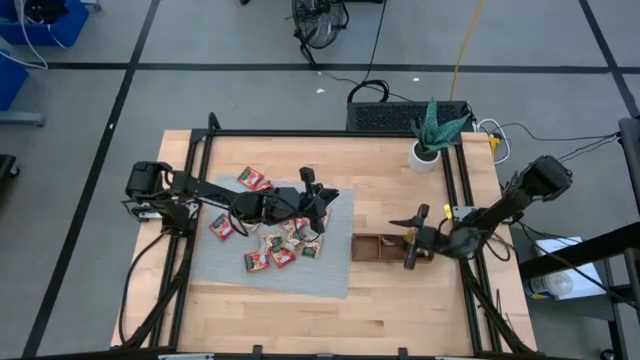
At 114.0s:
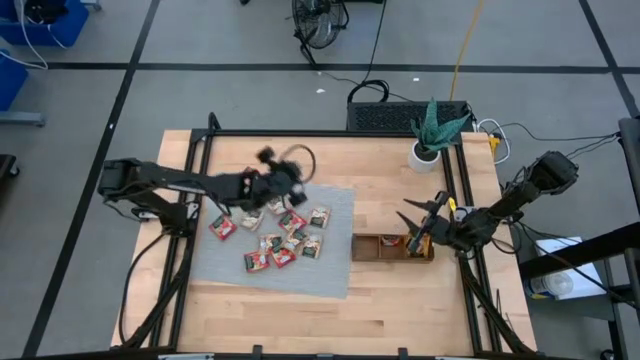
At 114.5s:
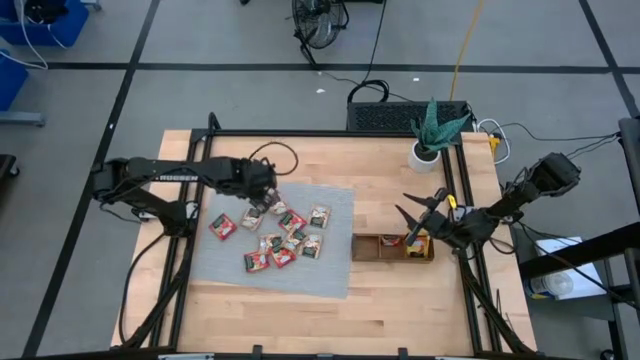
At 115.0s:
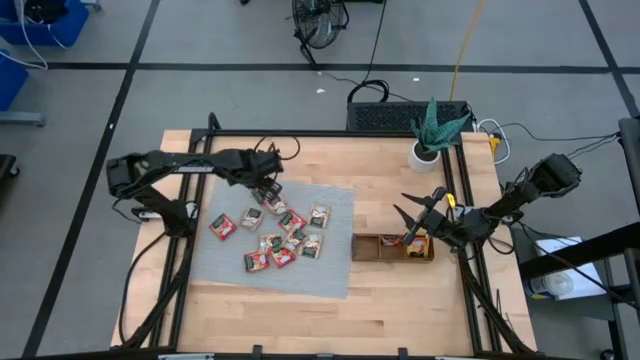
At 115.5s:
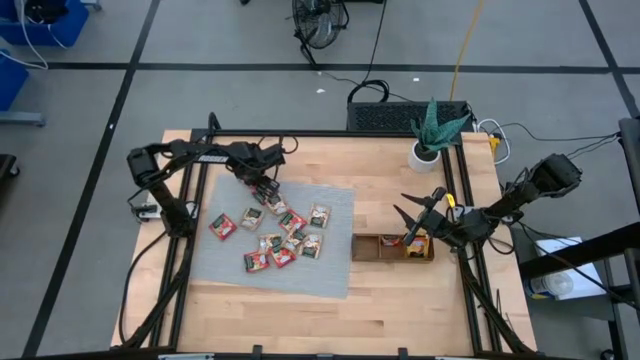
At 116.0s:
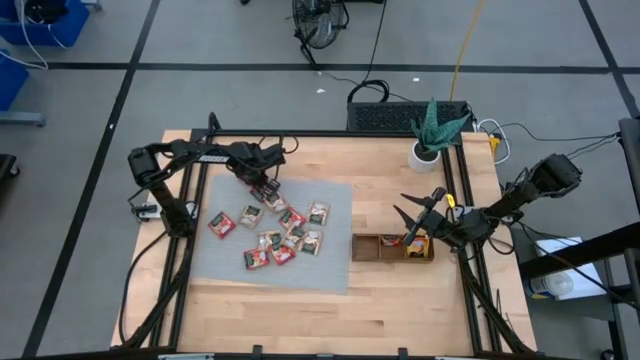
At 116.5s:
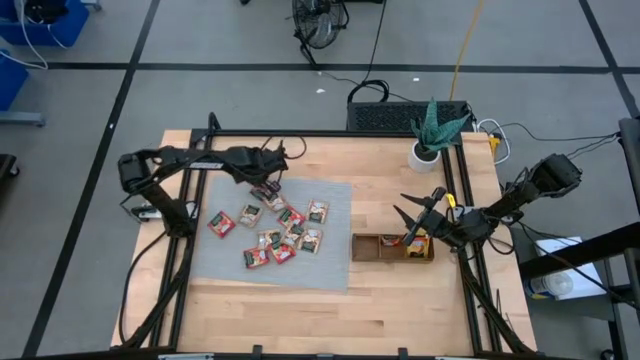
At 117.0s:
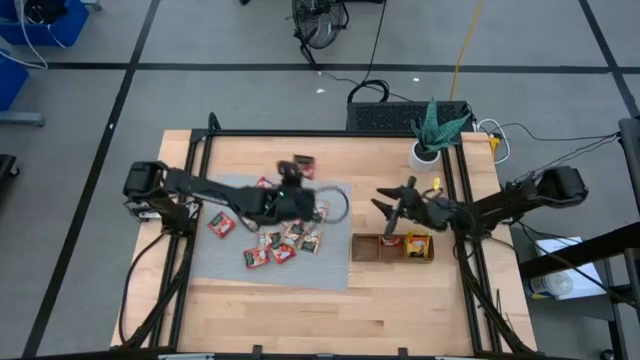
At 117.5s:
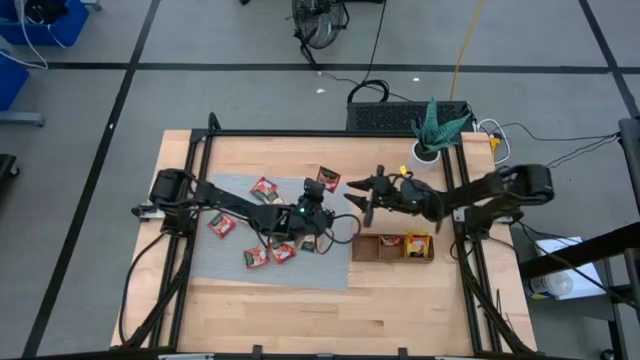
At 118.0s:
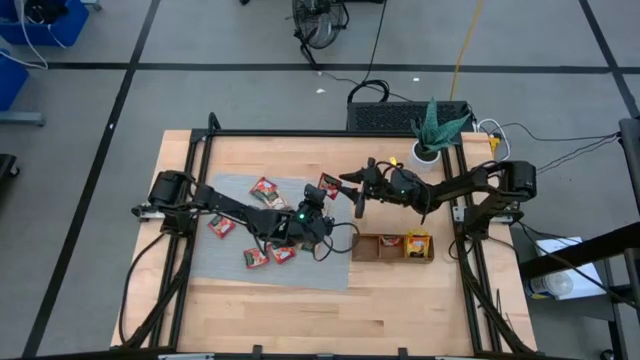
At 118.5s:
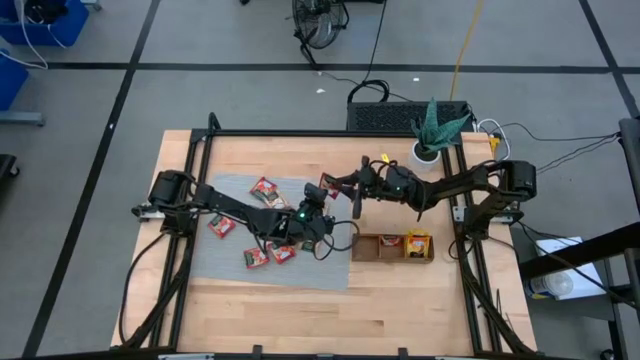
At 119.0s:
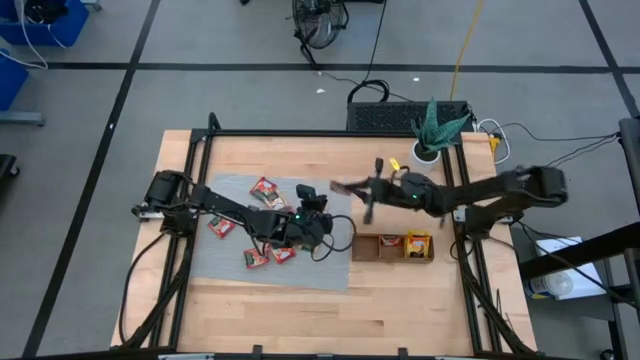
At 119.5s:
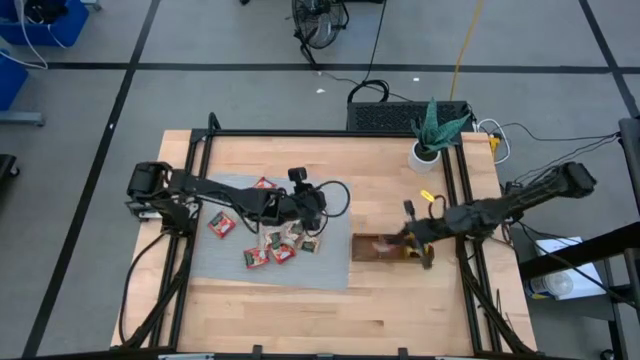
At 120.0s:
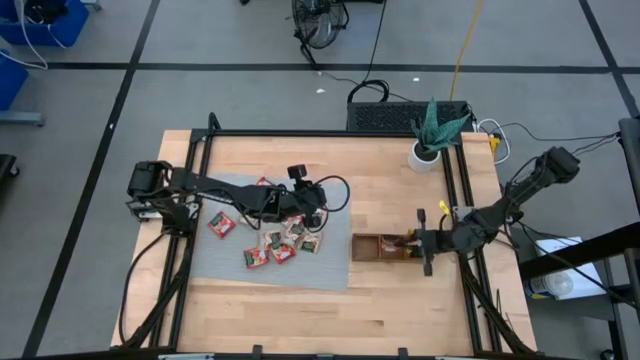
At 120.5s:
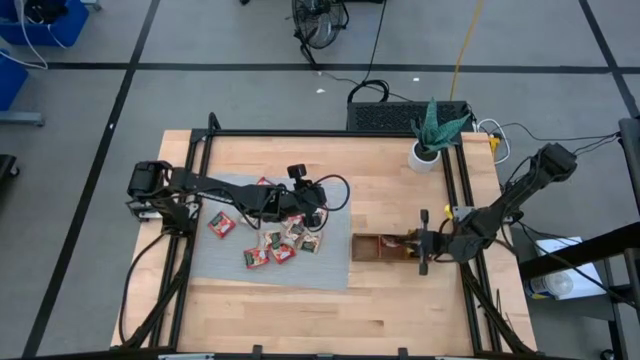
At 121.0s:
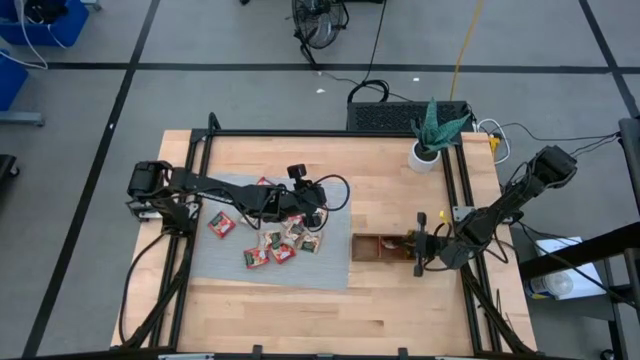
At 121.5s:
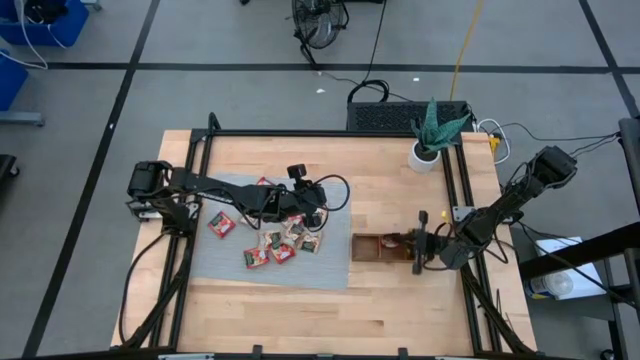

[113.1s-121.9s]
Task: Pick & Place Tea
Put the red tea bag into the middle section of the wooden organizer

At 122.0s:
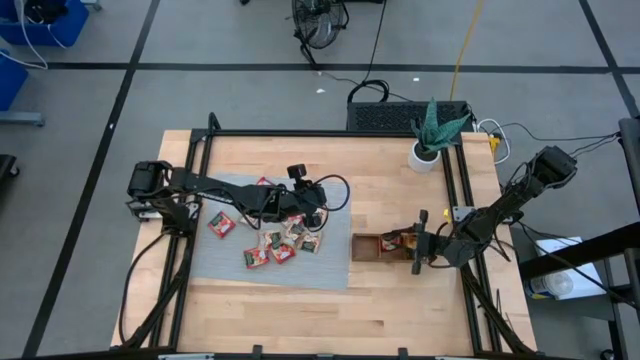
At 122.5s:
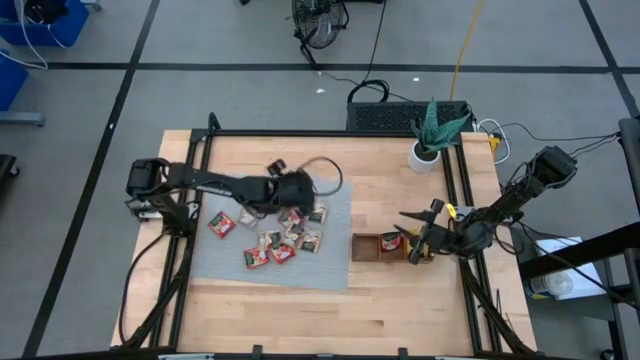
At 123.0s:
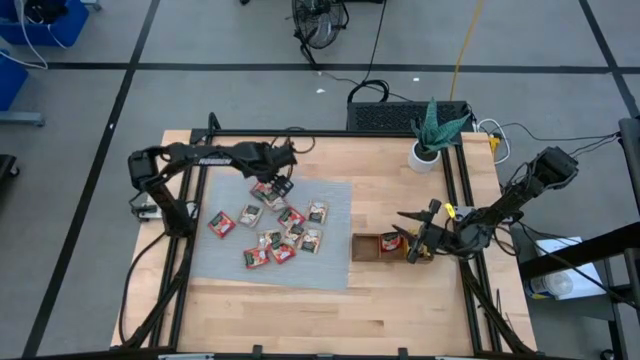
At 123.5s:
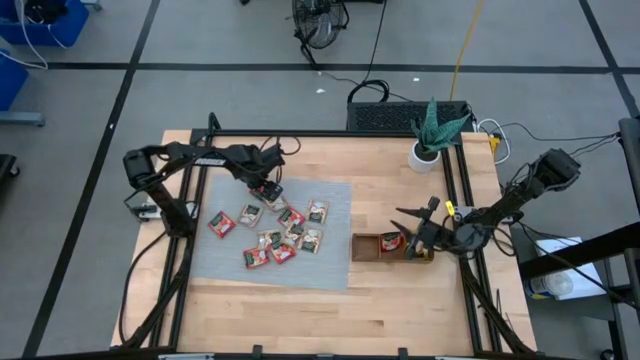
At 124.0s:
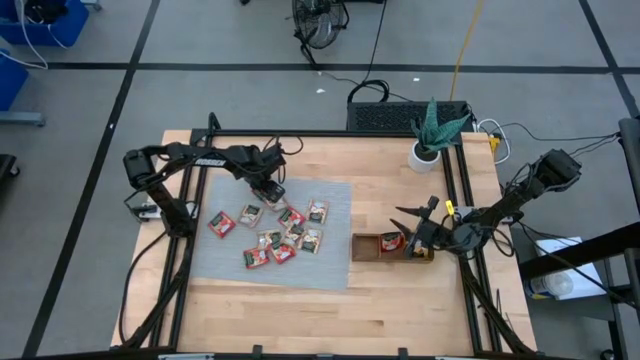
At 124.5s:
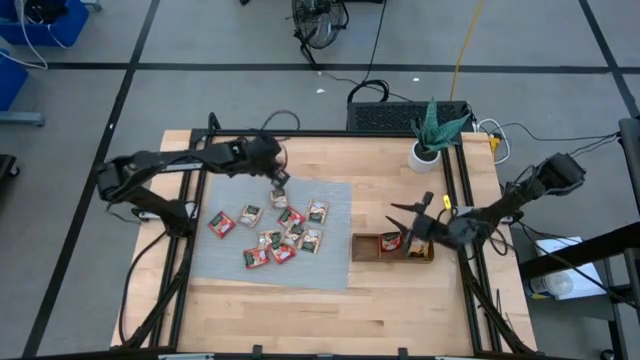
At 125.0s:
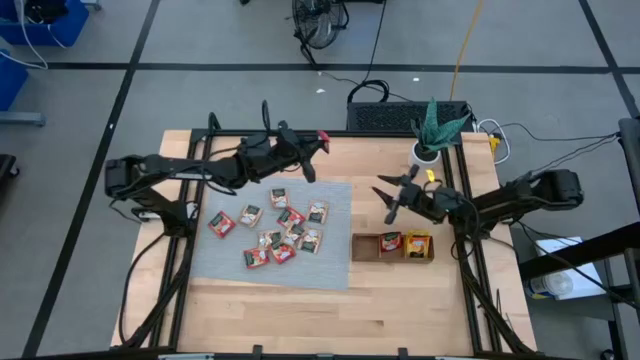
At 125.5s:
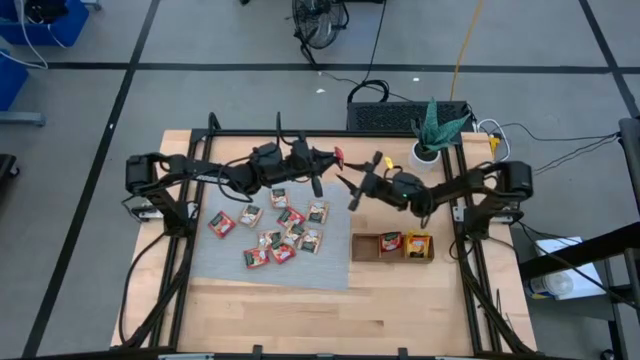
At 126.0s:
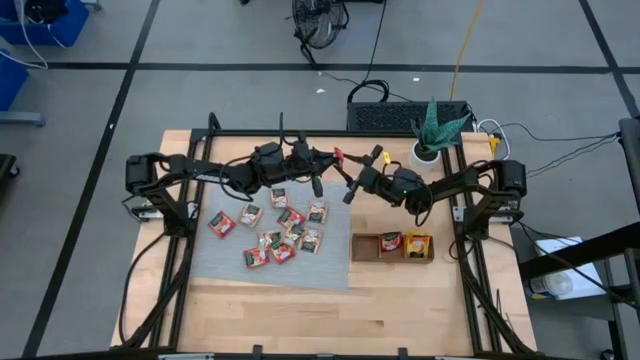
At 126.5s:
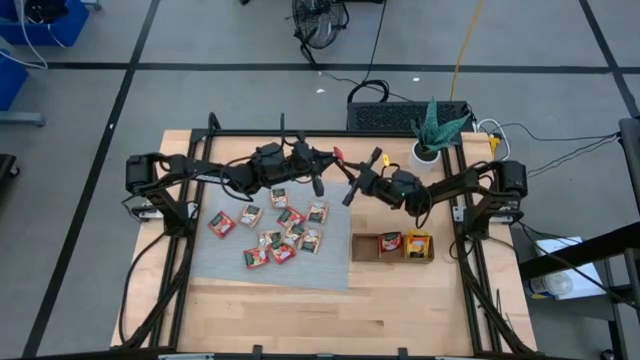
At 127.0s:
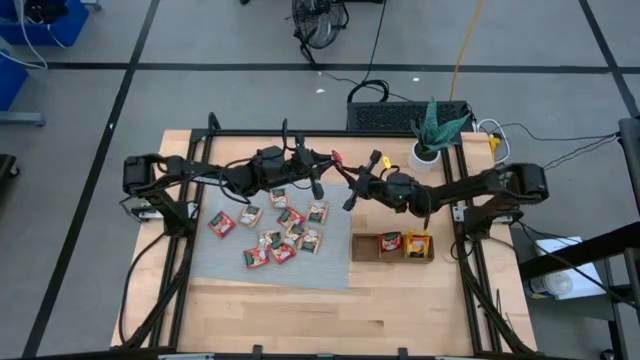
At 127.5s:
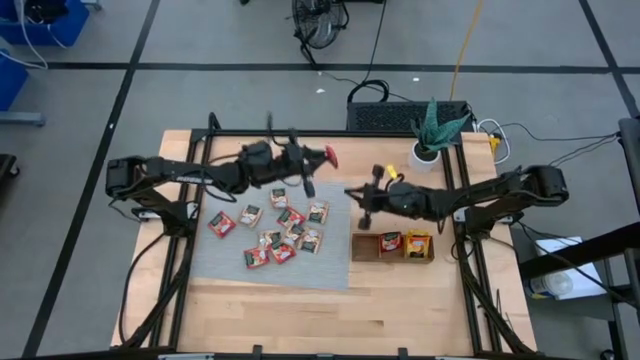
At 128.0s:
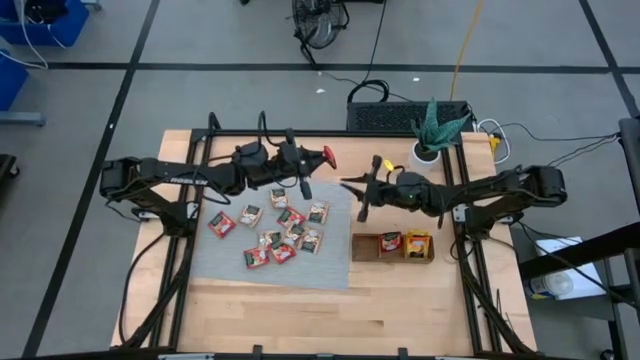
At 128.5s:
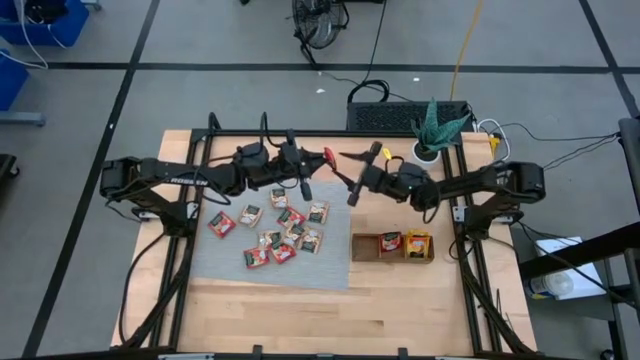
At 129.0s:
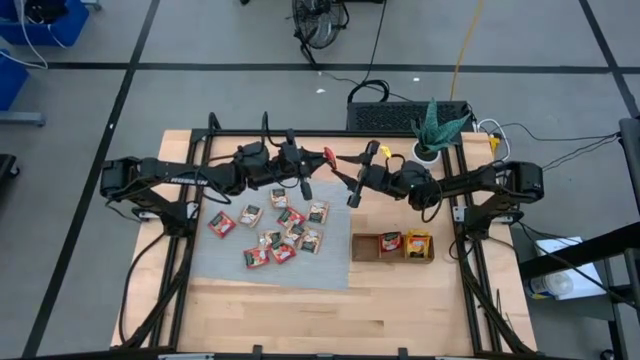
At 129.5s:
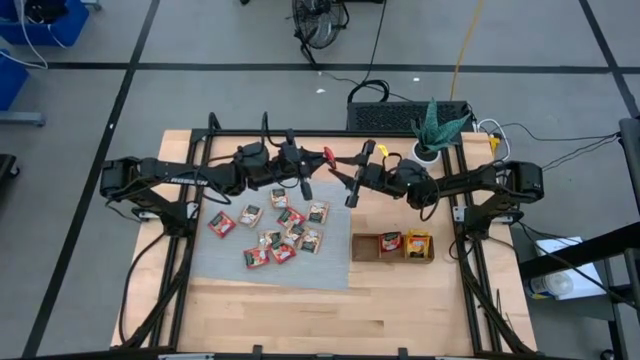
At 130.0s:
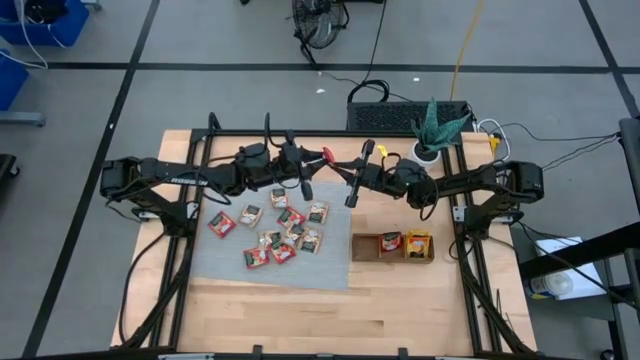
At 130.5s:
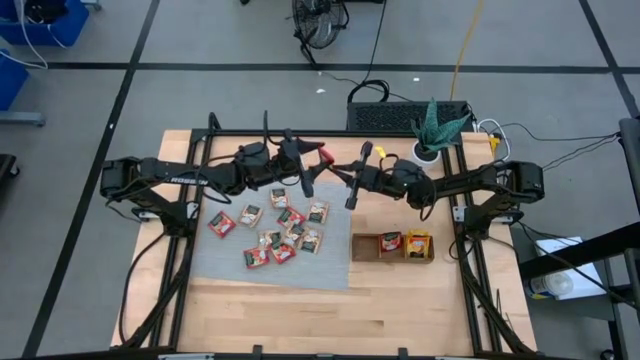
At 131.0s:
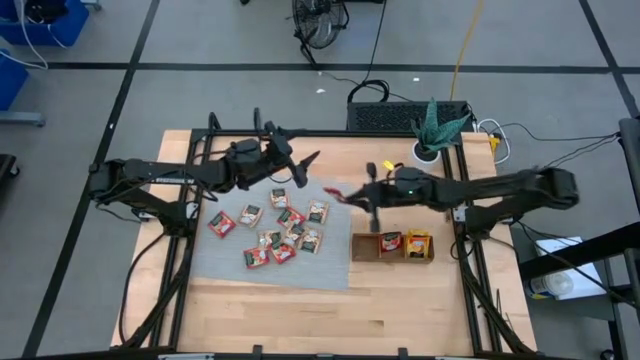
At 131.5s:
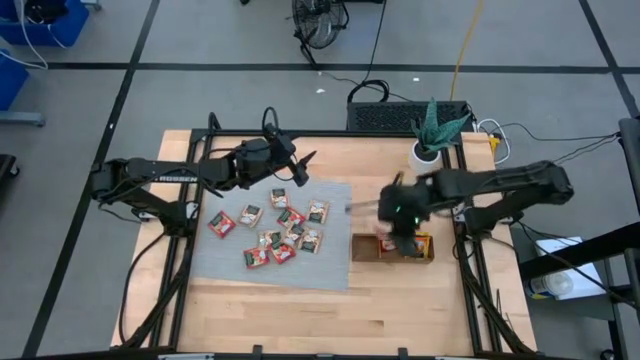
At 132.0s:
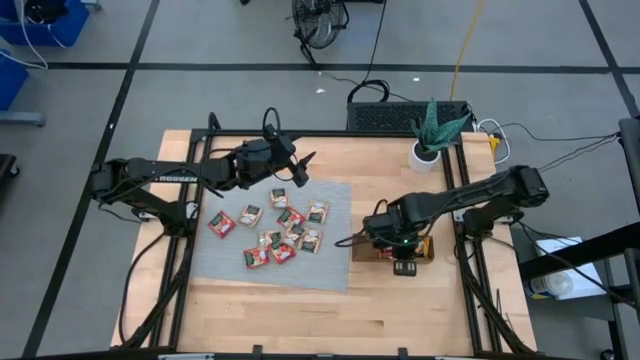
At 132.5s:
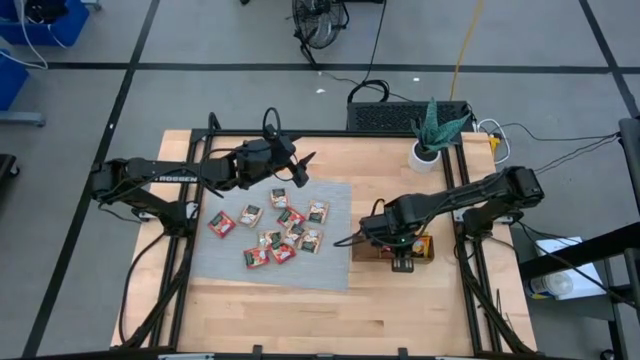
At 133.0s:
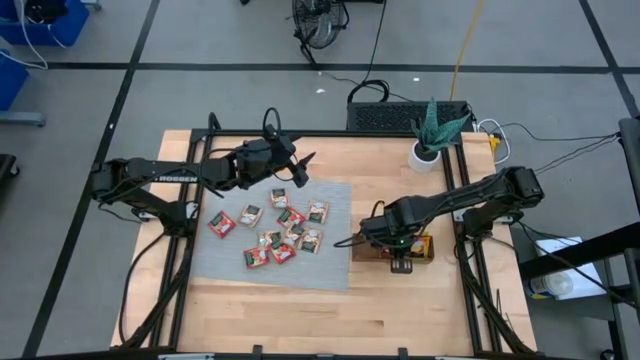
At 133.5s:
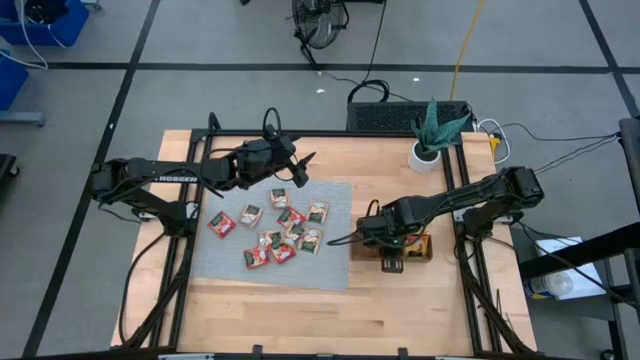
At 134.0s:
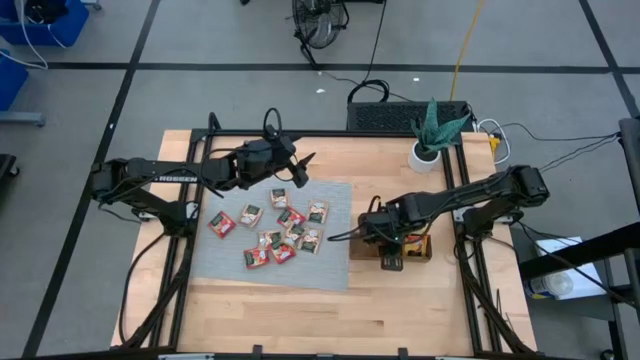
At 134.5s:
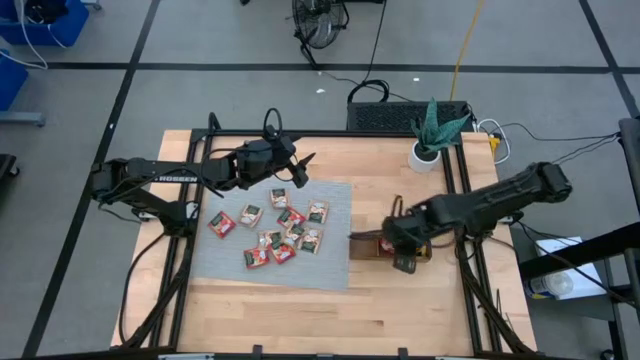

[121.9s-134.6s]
Put the red tea bag into the middle section of the wooden organizer
